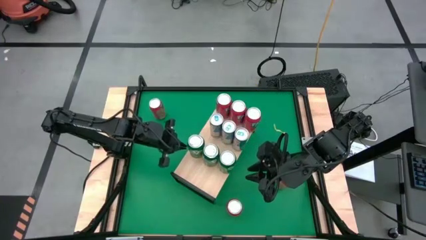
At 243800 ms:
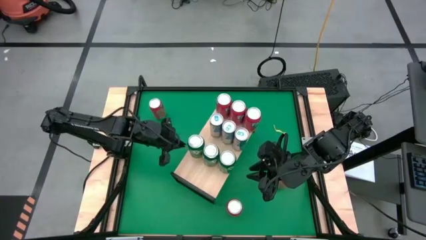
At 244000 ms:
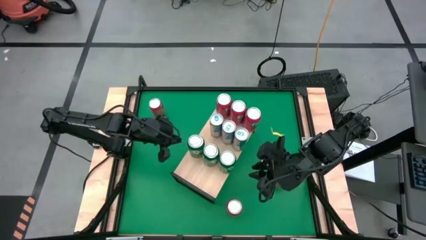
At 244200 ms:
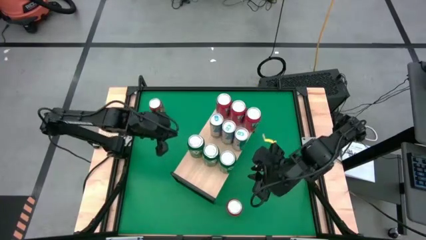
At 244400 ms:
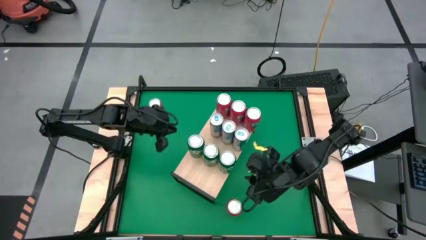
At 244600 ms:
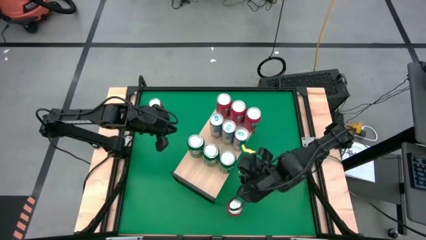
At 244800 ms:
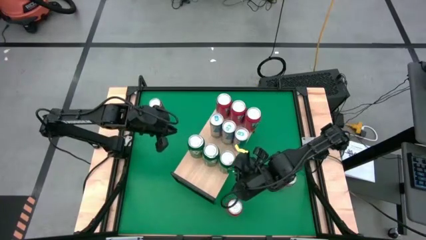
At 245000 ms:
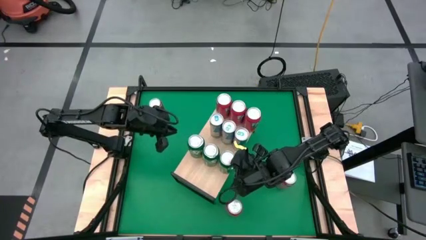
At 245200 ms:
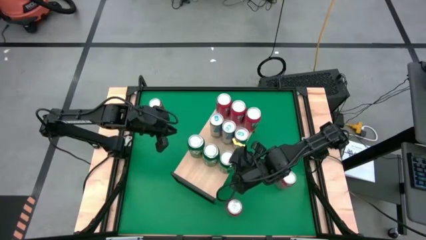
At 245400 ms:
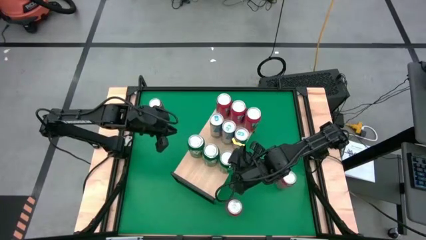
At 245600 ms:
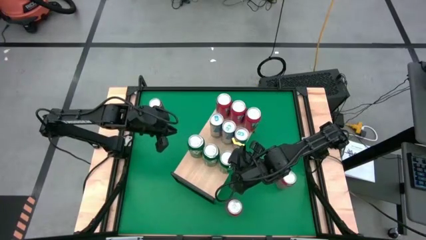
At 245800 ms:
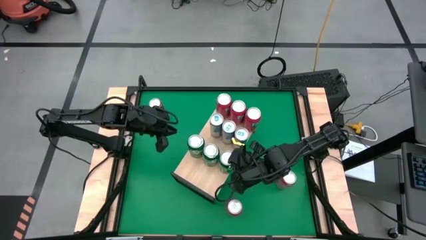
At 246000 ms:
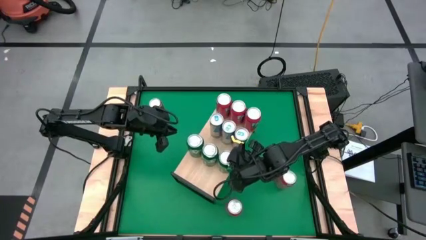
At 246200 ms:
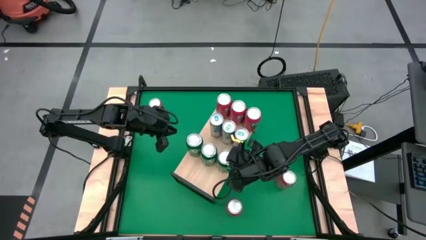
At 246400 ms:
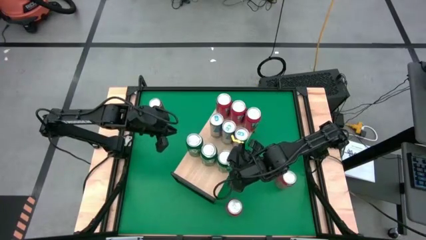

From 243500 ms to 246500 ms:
Task: Sort soda cans
Adjust the green soda cans on the shelf

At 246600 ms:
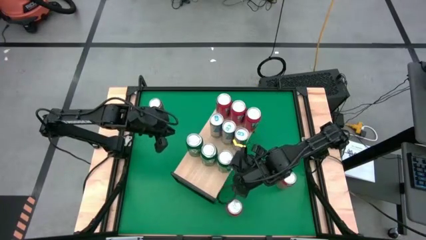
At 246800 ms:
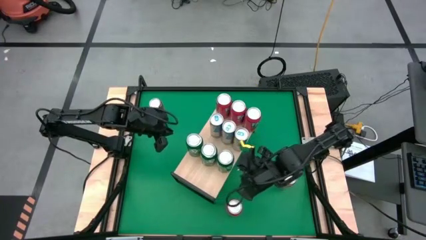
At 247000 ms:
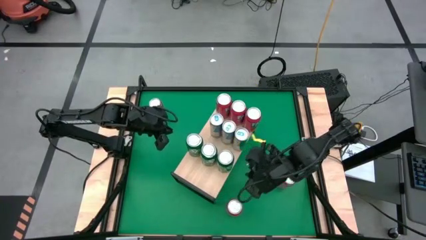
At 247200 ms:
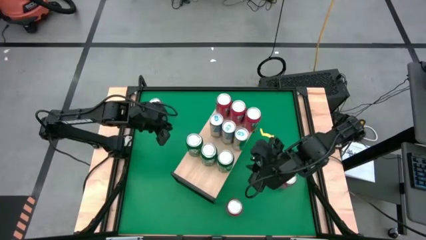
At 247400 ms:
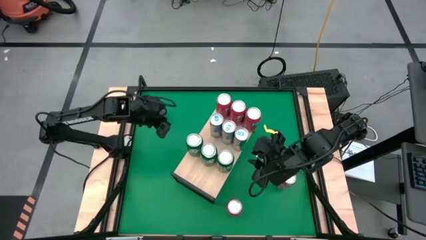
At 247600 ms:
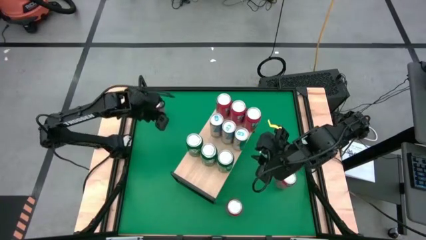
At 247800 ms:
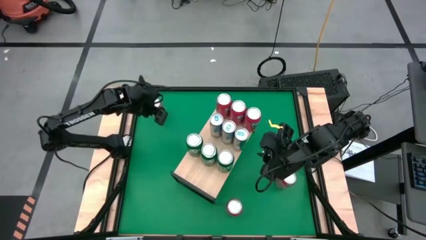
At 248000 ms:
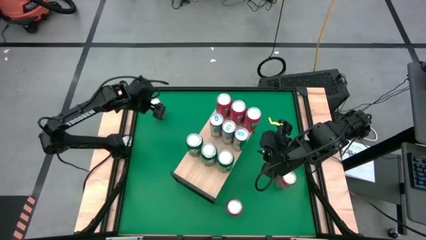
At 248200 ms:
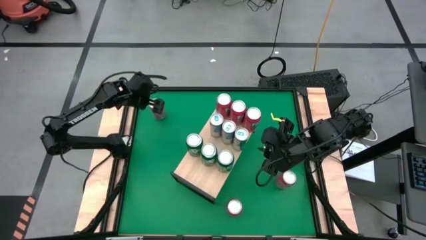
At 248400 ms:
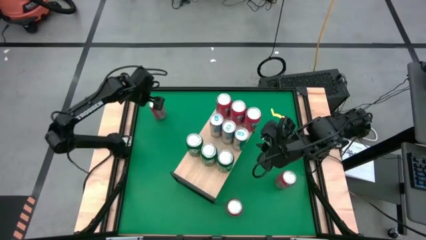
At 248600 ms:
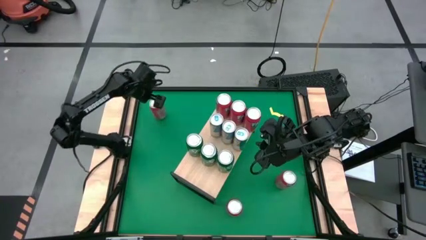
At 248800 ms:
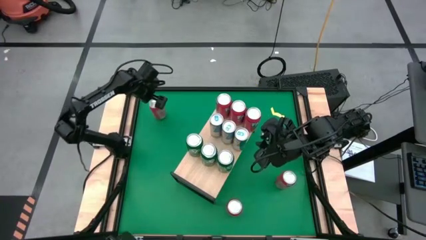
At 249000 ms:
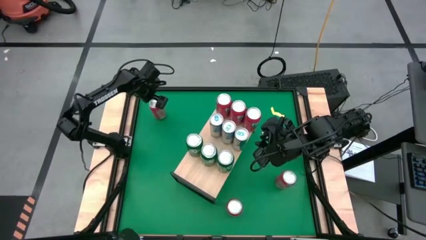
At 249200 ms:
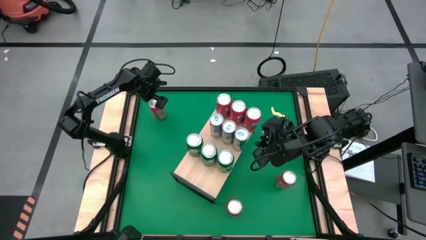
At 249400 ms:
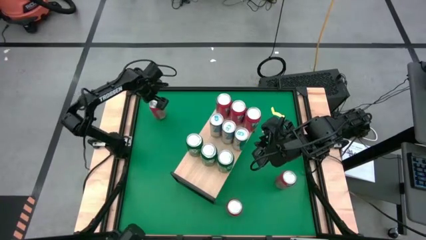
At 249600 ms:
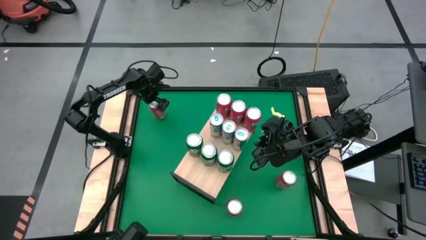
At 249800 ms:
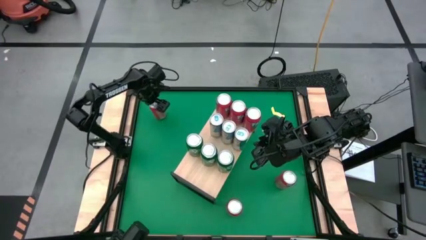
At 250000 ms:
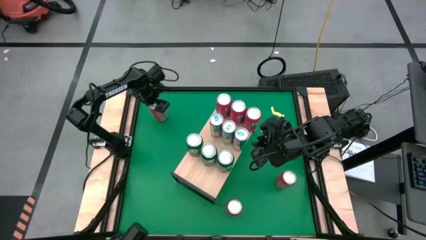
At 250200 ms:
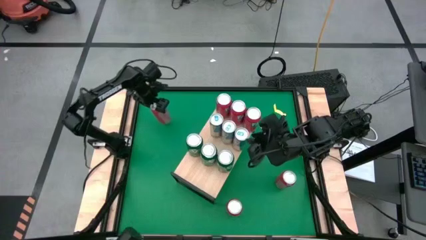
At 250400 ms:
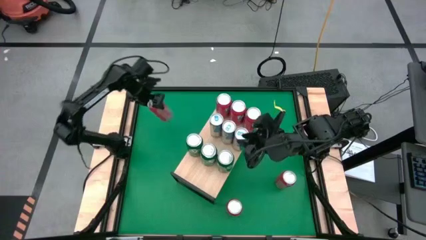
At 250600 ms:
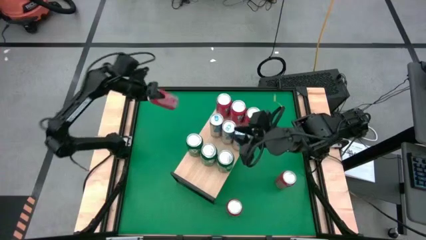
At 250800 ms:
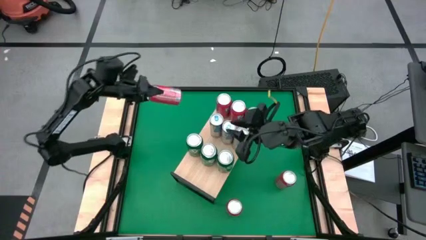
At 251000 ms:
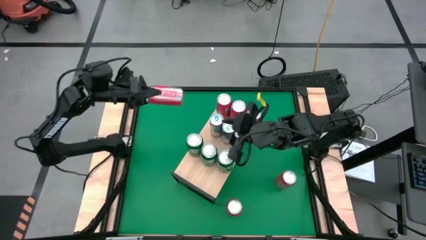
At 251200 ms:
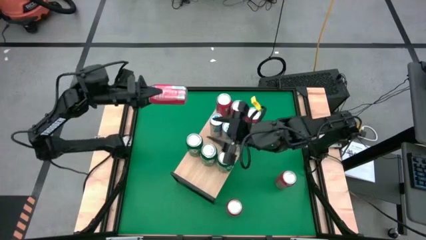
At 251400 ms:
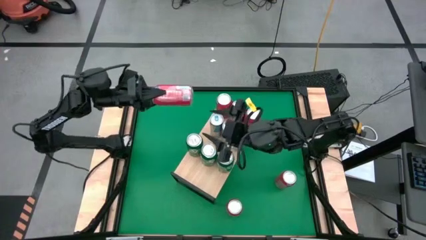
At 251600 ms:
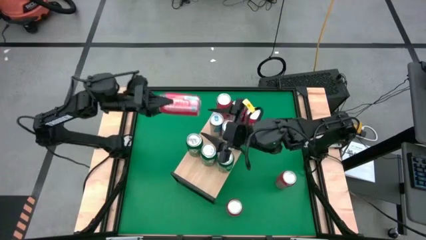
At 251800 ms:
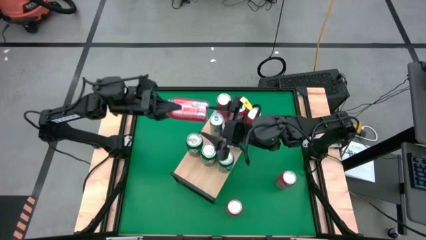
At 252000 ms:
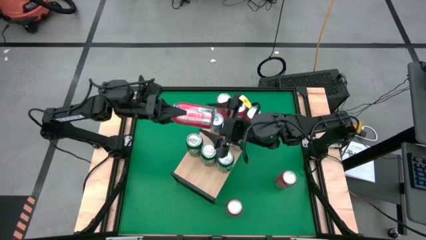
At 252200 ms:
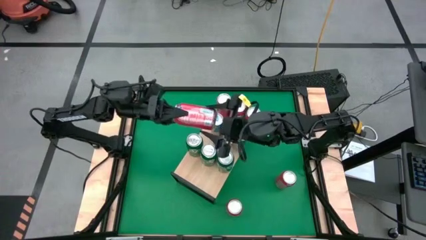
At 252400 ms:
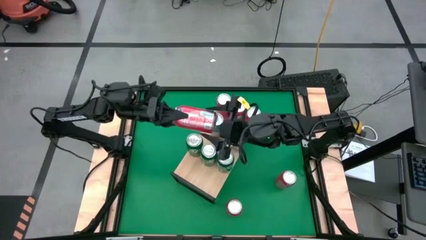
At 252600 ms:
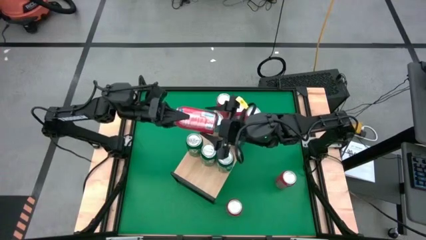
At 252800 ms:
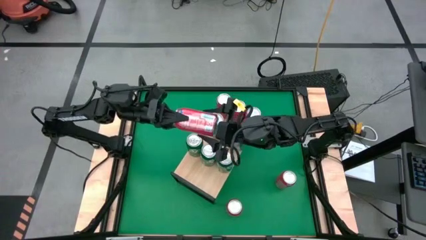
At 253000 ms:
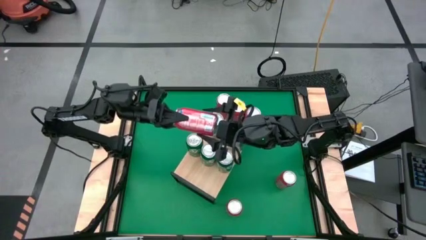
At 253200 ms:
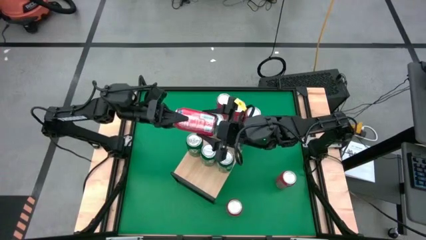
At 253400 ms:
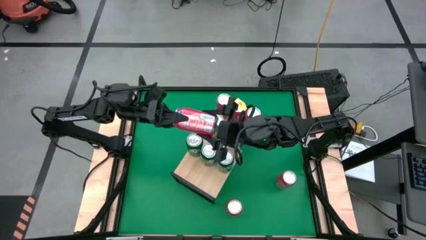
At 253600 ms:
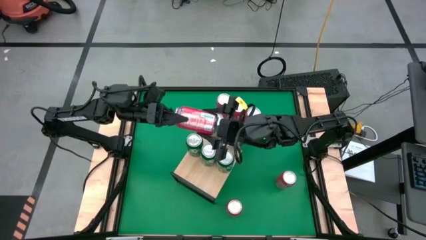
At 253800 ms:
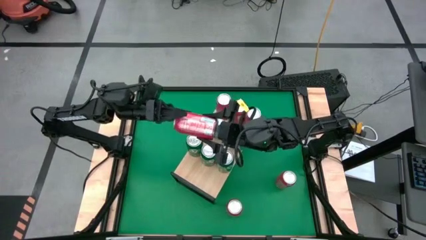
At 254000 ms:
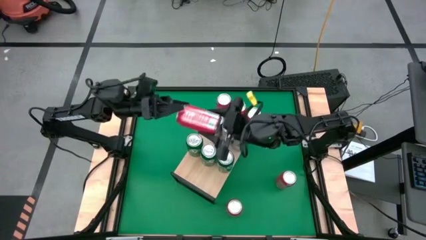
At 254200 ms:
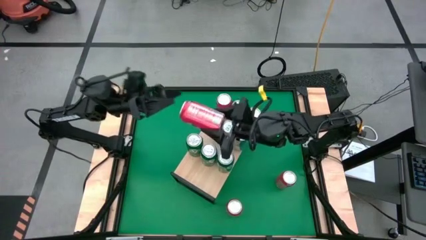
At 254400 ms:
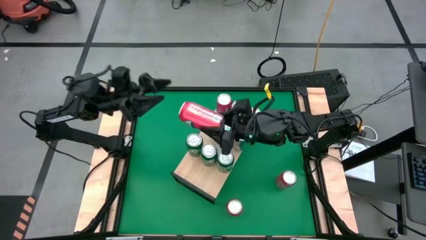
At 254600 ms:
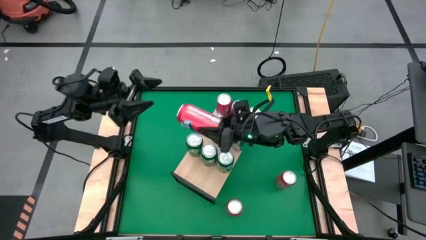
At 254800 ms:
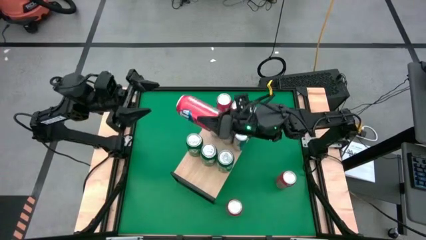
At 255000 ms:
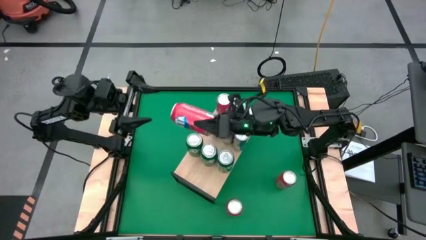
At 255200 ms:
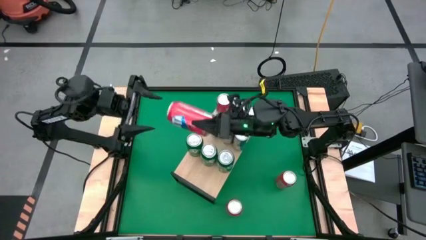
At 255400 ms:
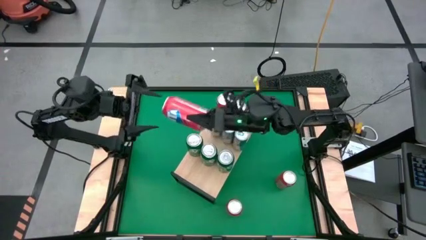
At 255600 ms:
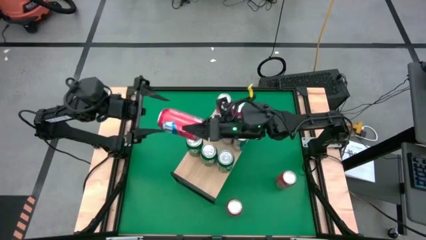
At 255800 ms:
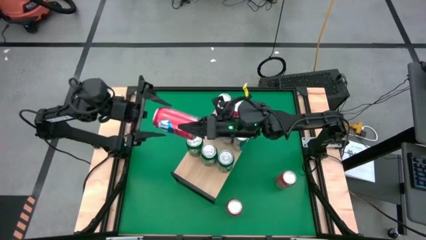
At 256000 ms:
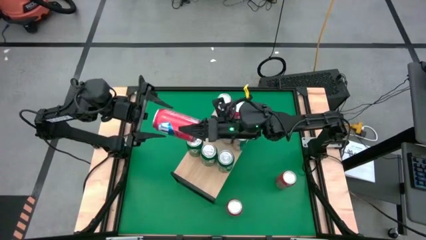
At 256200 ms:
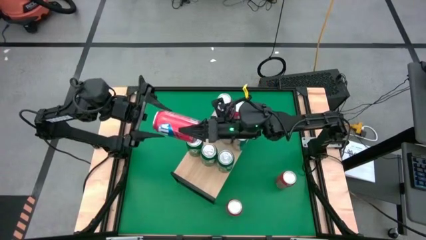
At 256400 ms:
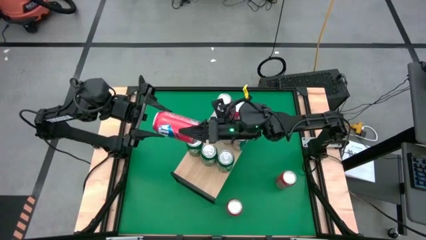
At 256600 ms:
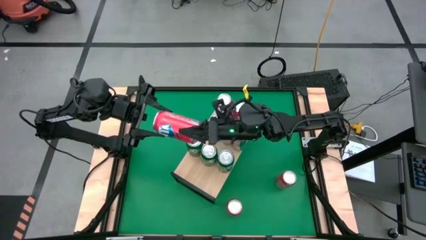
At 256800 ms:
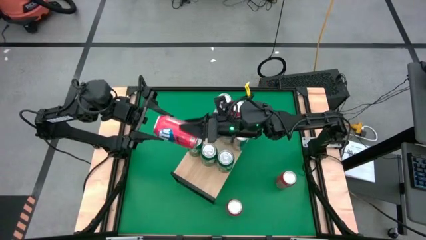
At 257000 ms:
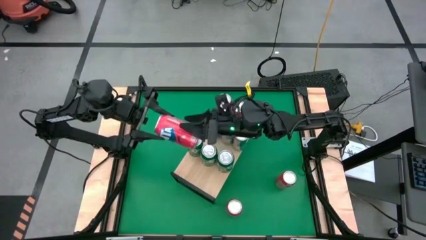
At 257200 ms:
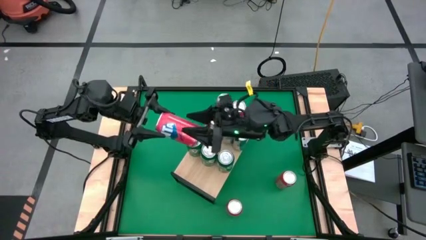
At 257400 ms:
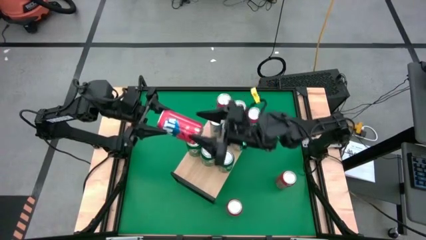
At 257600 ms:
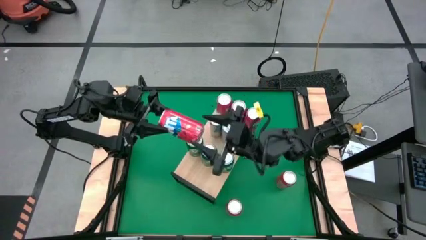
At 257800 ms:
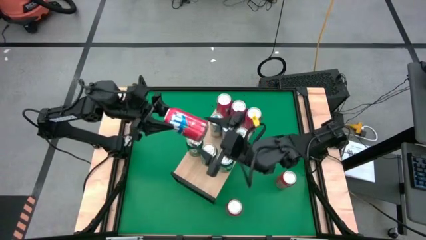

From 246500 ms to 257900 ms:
Put the red soda can on the shelf

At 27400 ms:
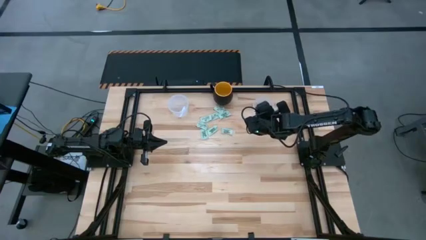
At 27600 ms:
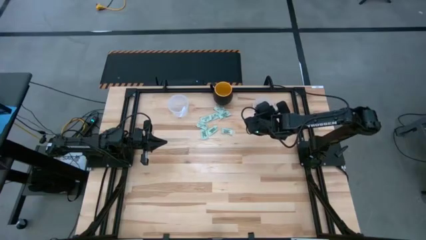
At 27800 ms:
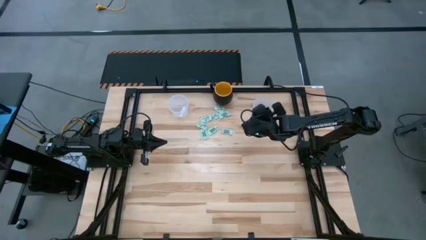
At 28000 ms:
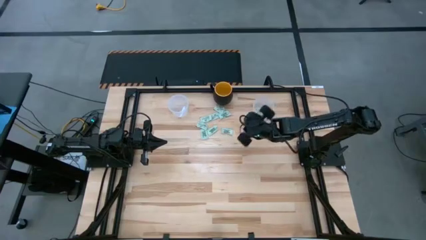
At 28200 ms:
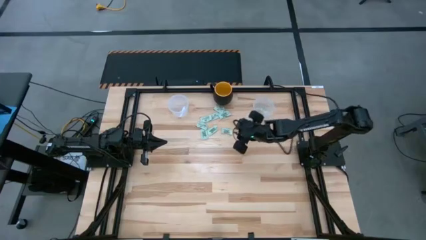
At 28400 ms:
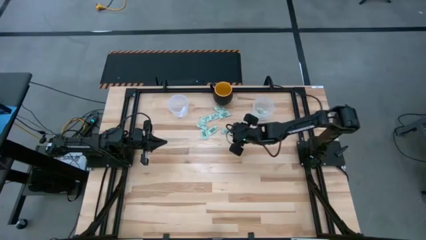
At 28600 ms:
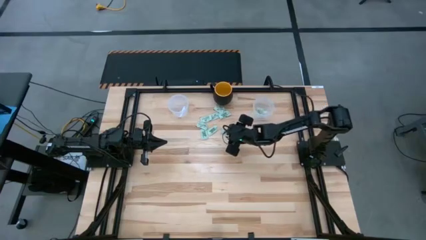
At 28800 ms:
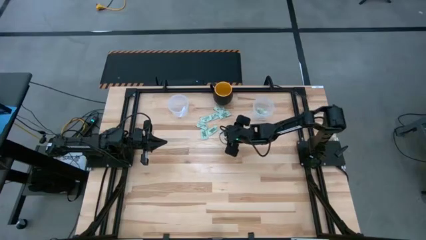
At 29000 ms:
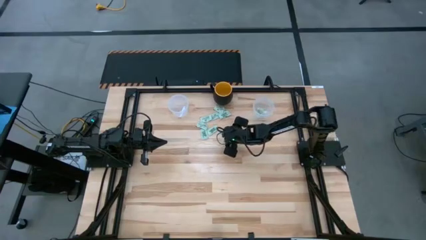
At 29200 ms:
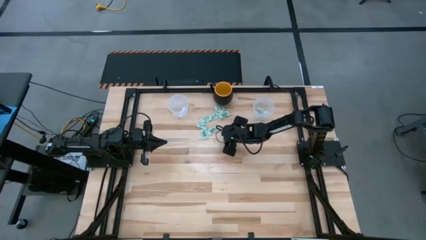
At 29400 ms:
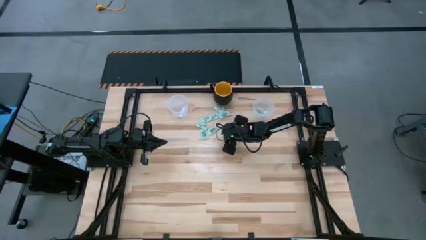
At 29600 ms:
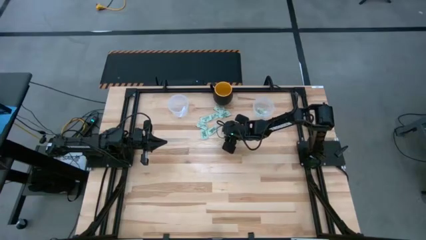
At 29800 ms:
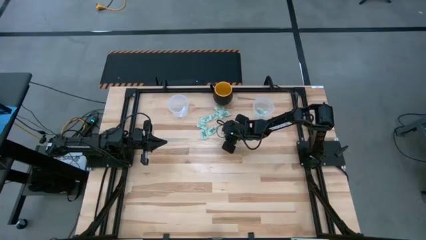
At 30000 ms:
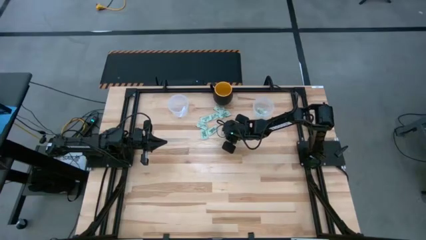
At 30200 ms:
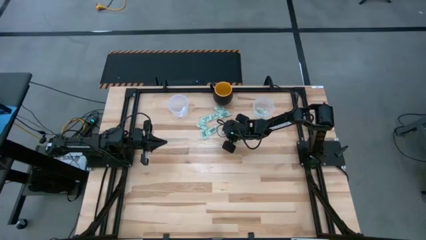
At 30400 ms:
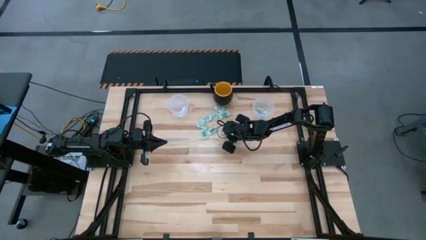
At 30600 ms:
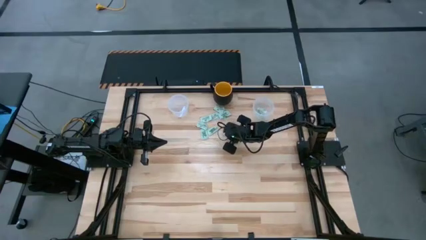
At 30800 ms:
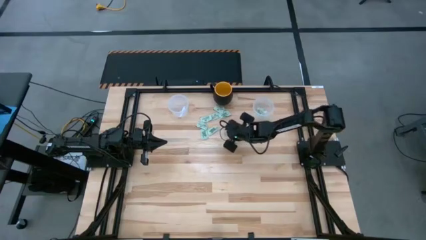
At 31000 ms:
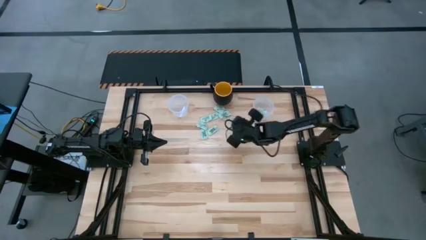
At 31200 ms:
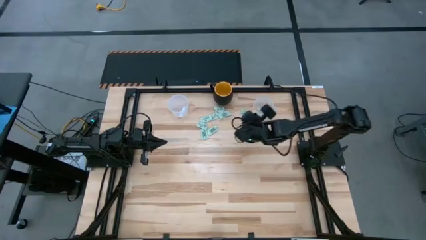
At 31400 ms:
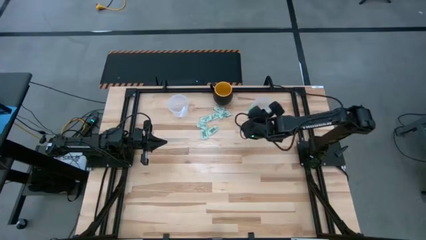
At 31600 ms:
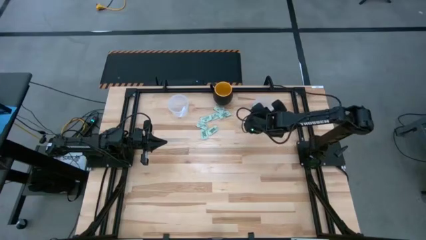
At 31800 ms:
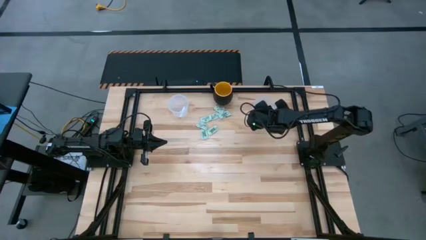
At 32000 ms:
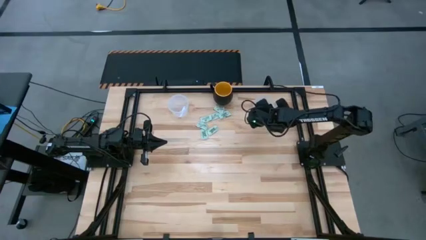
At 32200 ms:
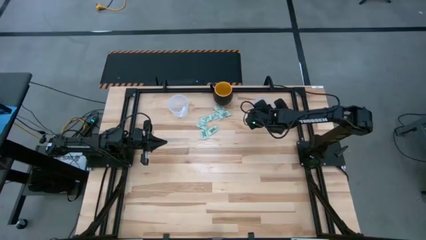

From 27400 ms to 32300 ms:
Task: Pick and place Stevia / Truvia into bins
Put the stevia packet into the right transparent container
